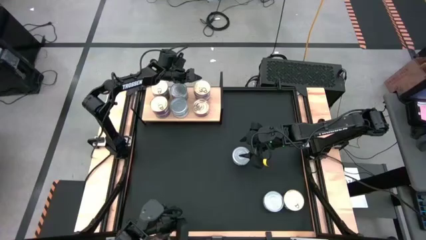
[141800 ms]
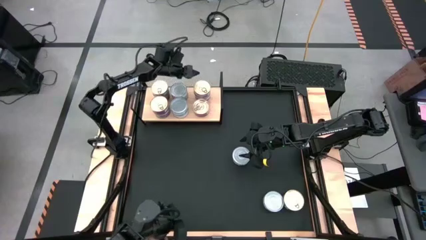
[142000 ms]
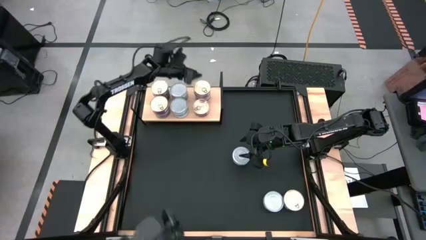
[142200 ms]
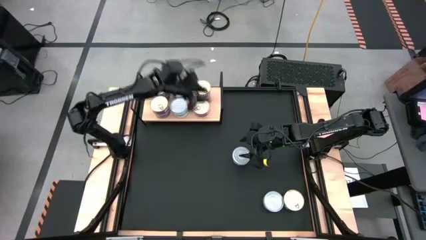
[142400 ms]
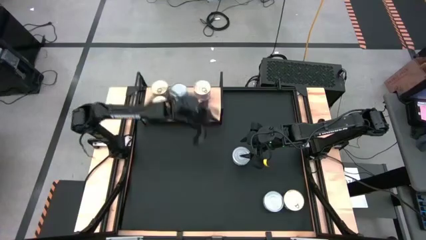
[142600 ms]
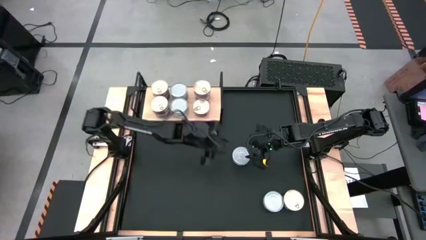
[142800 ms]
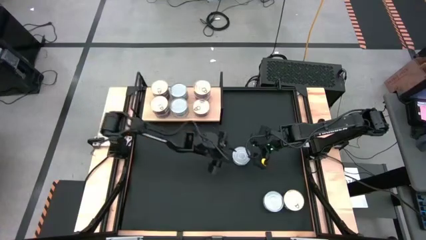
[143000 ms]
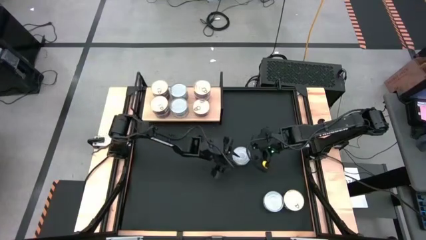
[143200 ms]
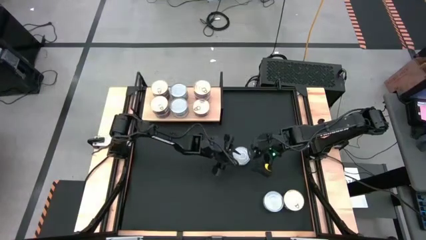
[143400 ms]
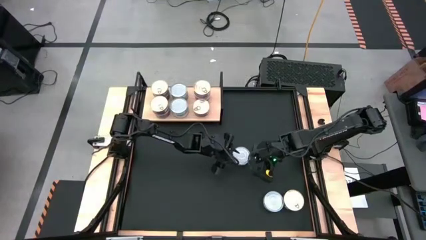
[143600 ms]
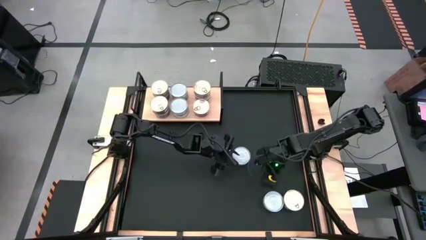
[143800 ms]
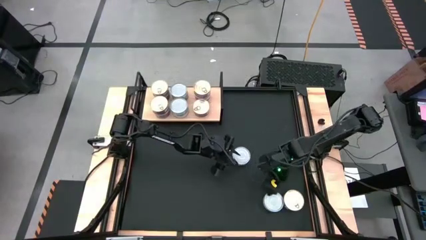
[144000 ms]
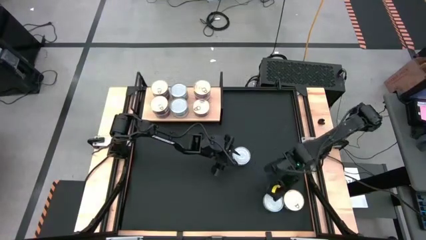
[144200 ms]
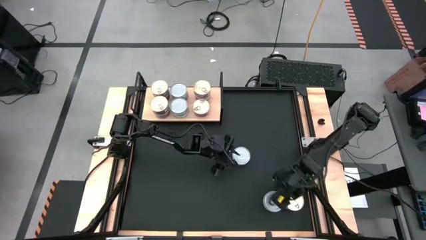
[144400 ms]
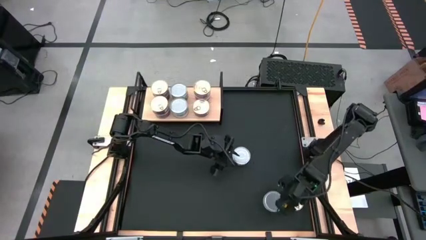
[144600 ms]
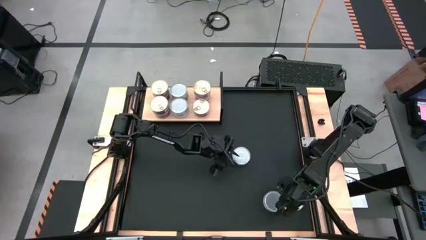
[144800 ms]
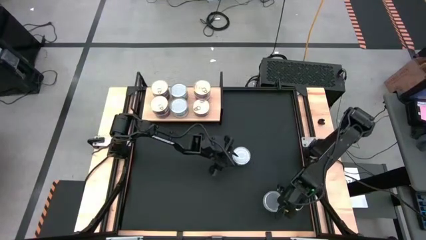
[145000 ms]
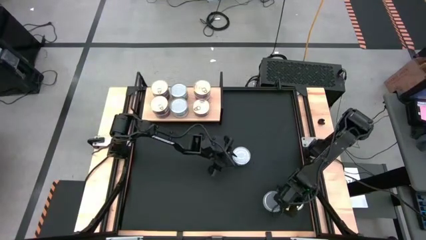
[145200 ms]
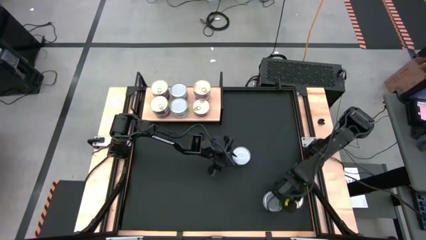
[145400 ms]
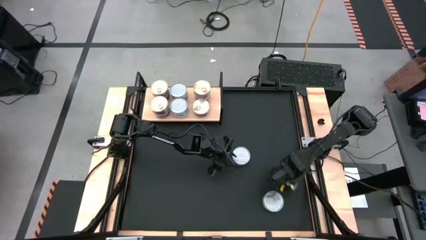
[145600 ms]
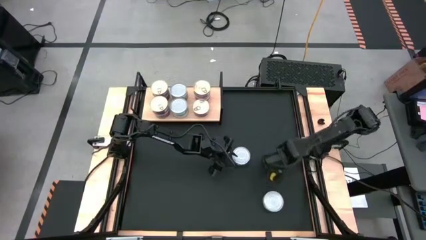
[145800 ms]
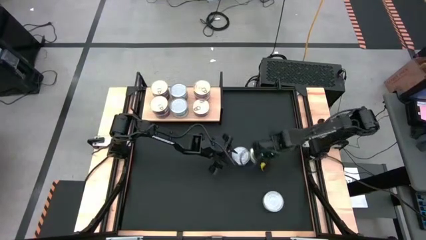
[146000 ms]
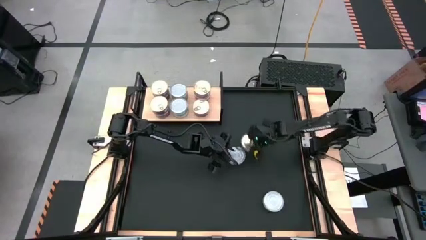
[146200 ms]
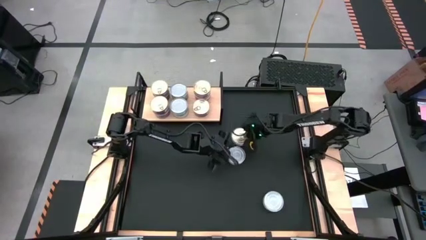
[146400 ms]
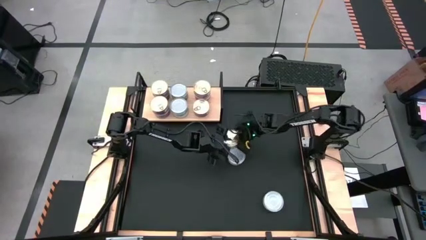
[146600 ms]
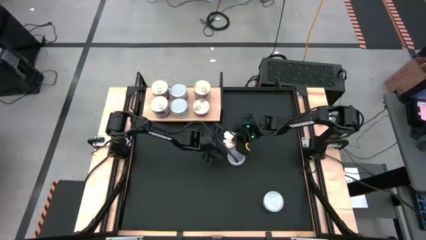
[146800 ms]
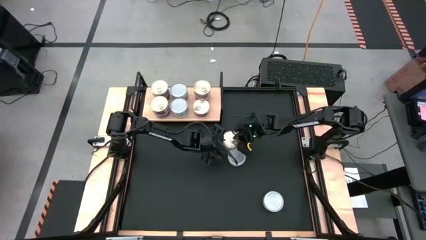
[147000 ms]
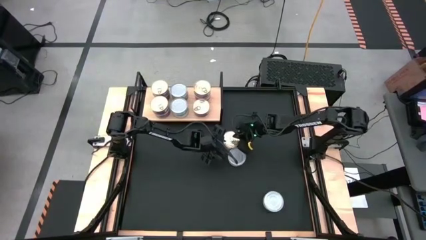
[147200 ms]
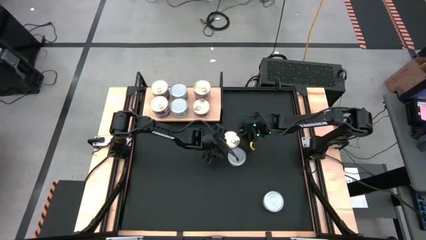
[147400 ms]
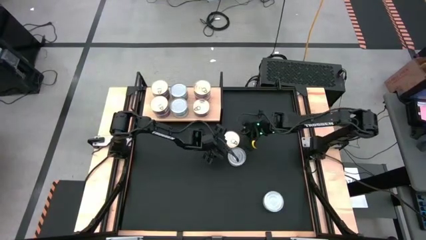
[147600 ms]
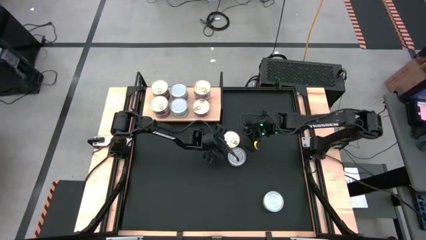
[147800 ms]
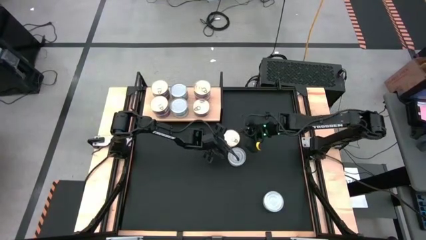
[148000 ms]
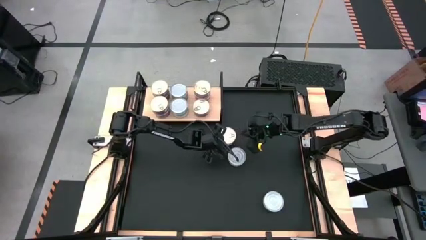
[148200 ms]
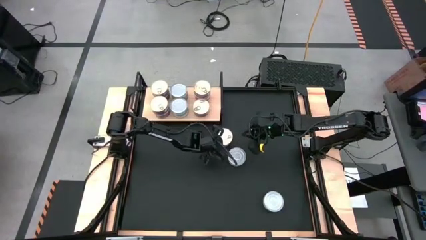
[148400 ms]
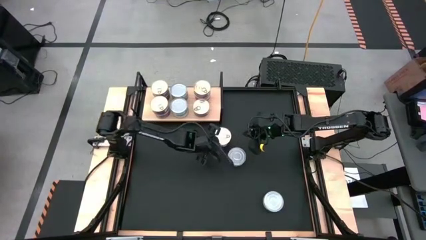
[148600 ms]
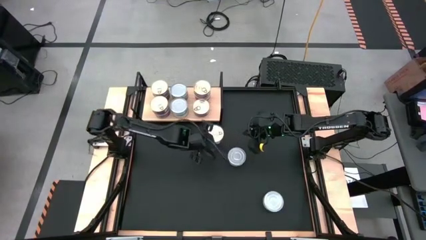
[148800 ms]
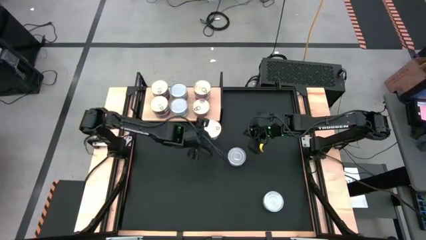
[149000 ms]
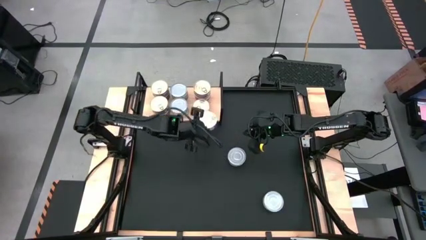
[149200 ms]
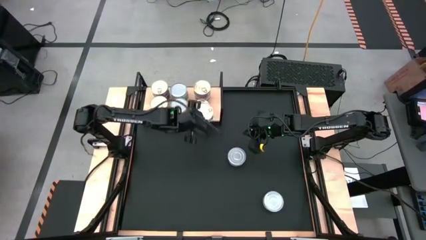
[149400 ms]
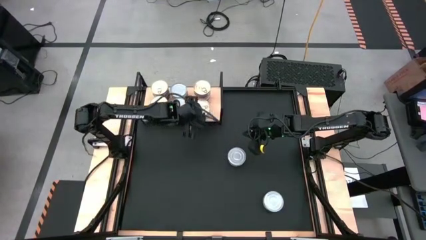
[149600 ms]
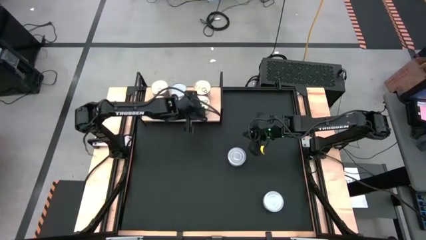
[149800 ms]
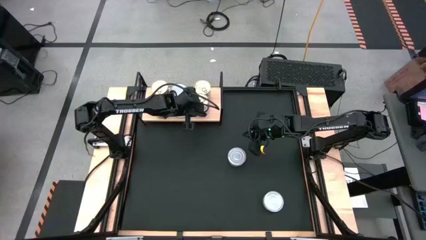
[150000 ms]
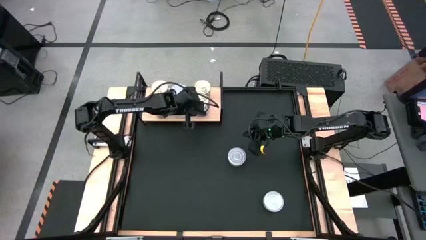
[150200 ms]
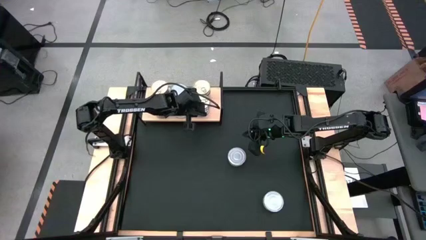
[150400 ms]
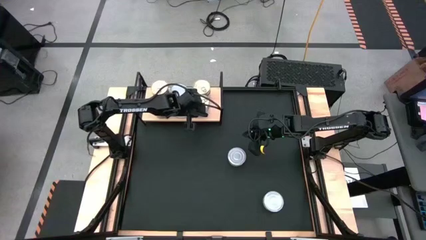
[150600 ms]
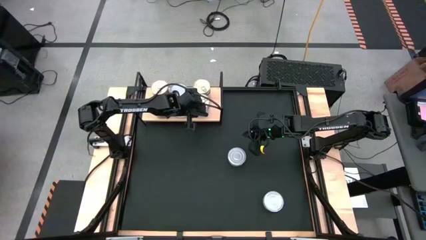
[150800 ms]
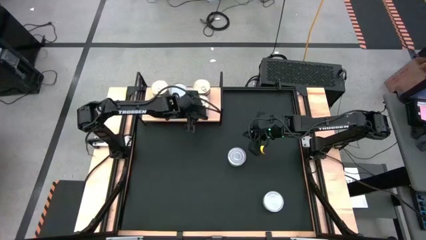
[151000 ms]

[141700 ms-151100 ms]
Task: Stack canned seafood by type on shelf
Stack the blue tuna can on top of the blue tuna on the shelf

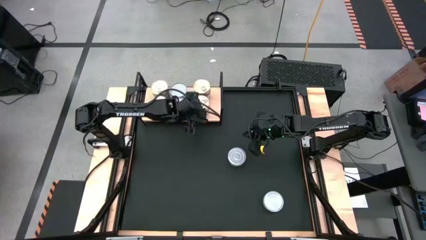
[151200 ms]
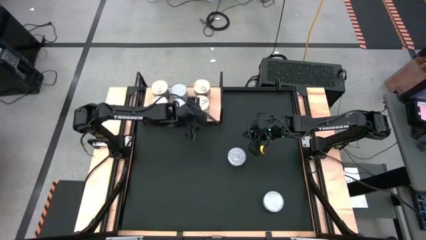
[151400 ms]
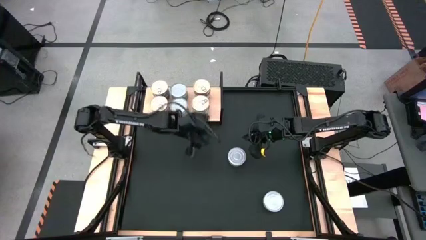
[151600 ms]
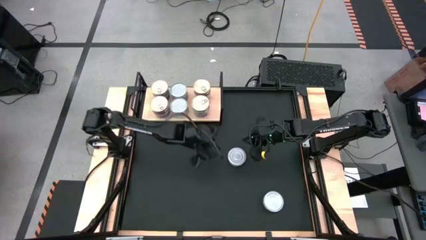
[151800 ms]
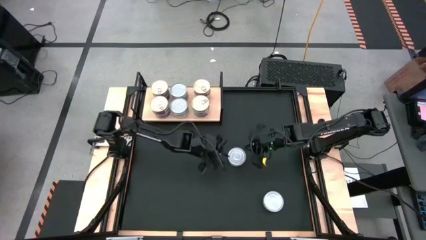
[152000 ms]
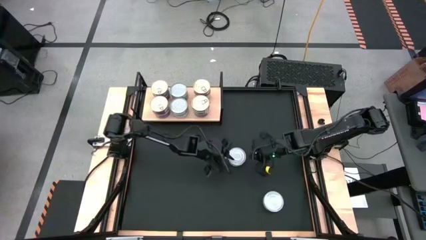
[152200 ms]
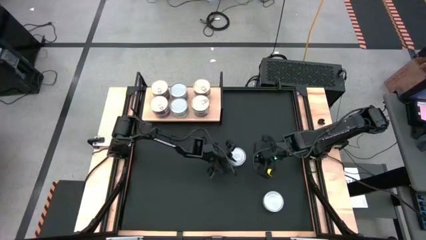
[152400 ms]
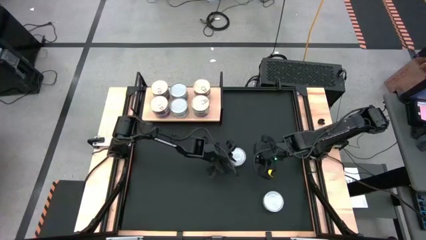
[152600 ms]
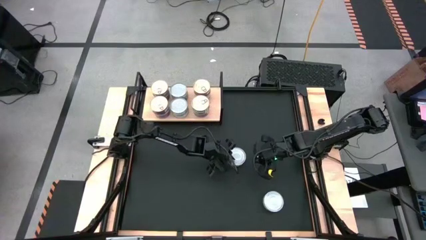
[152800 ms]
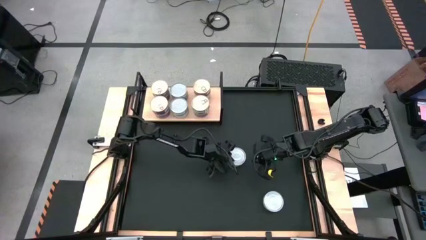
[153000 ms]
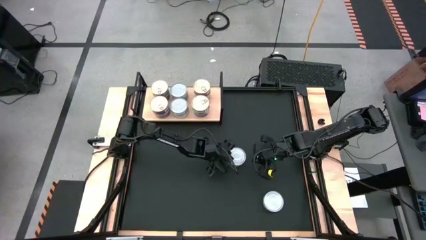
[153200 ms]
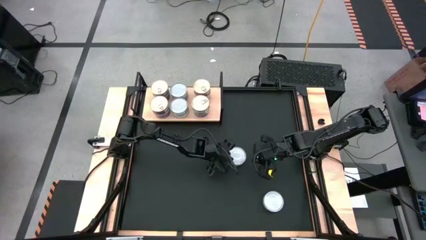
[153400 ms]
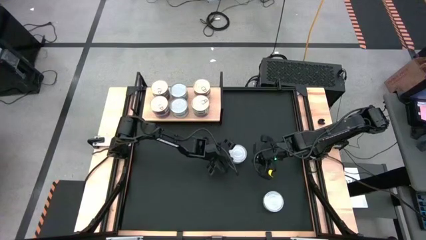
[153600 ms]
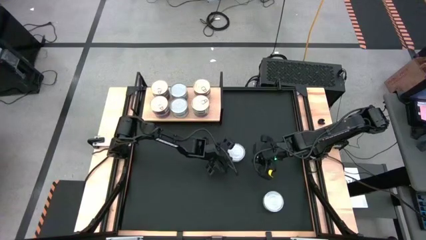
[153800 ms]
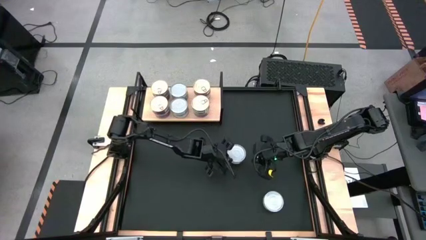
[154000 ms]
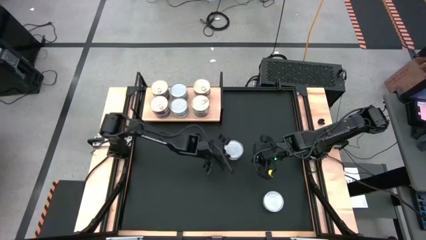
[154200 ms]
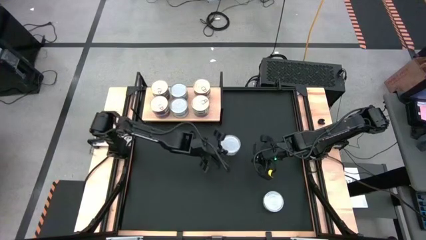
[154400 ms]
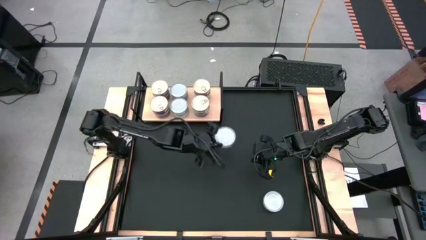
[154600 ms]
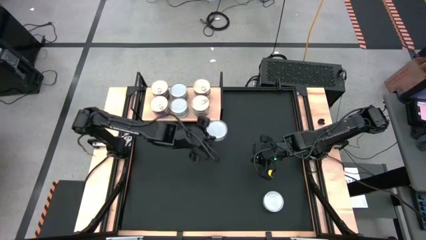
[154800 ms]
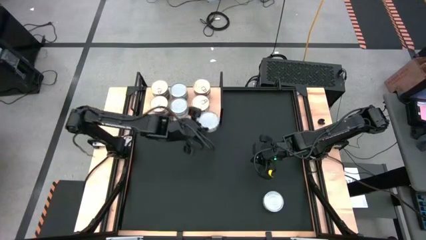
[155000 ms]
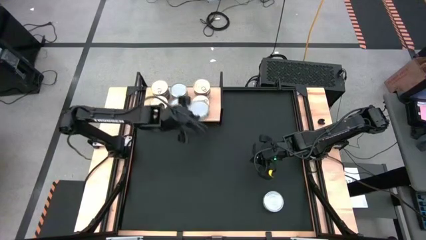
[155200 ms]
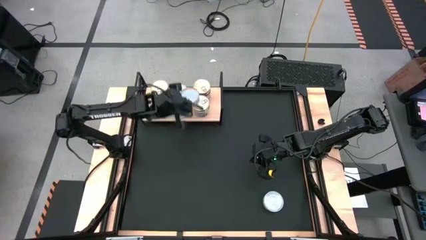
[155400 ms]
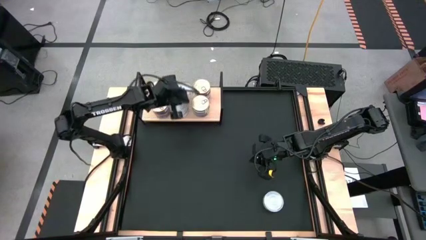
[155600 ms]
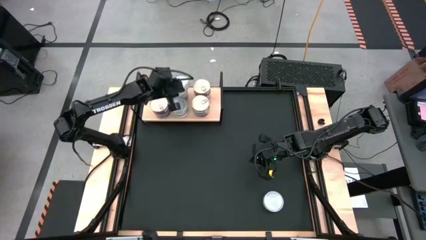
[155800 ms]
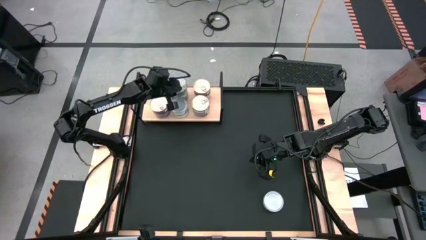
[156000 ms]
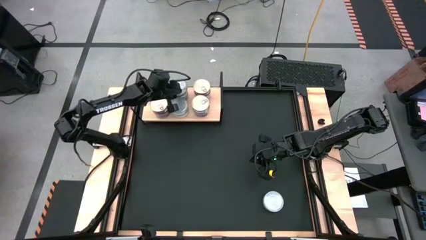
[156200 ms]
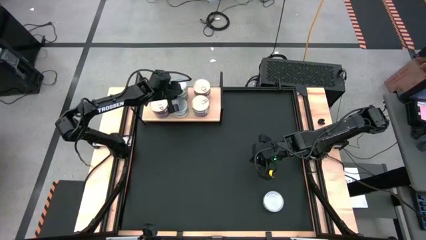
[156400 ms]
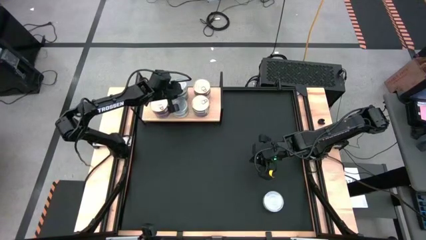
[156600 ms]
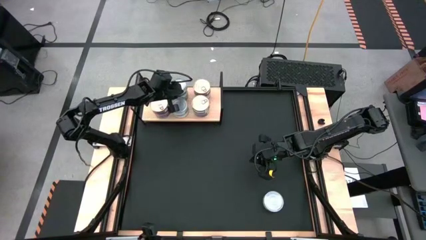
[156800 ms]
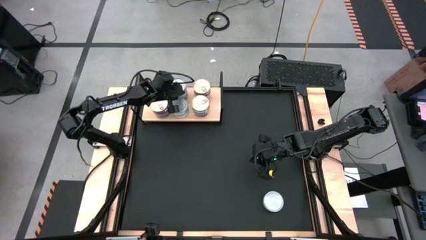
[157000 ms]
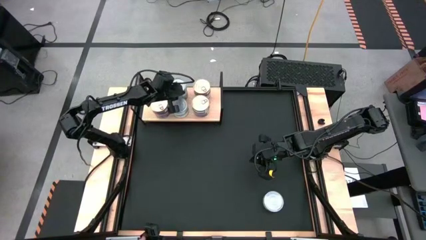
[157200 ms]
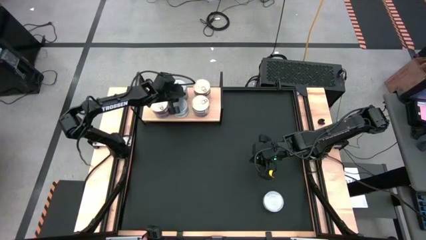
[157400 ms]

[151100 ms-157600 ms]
Stack the green tuna can on top of the green tuna on the shelf

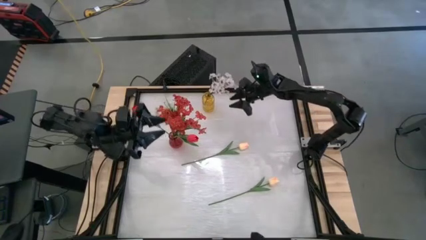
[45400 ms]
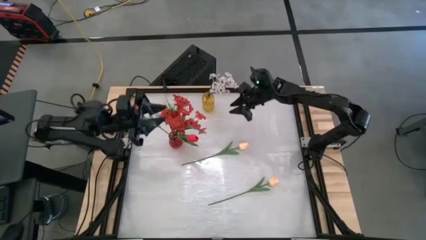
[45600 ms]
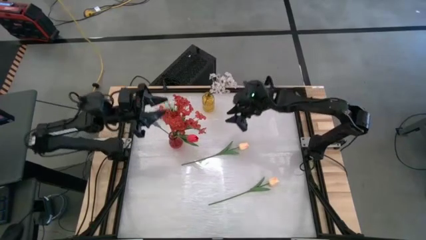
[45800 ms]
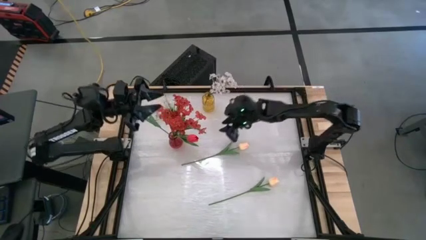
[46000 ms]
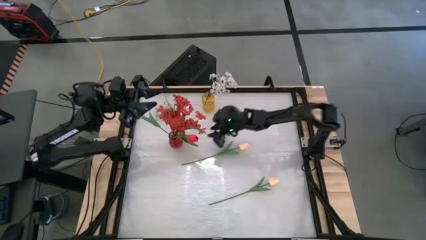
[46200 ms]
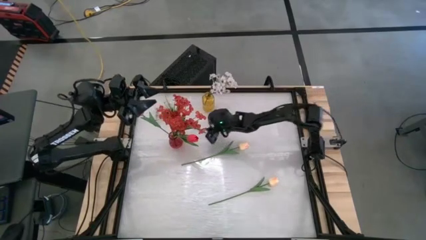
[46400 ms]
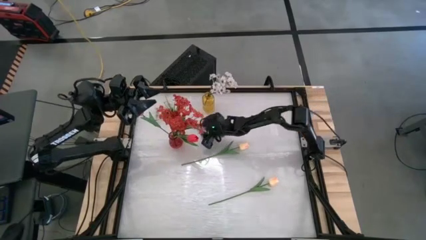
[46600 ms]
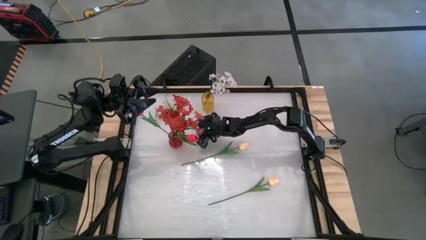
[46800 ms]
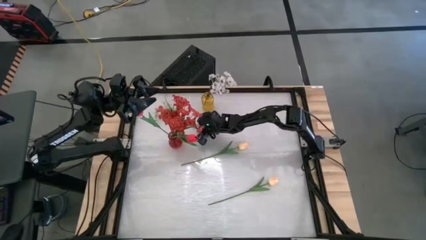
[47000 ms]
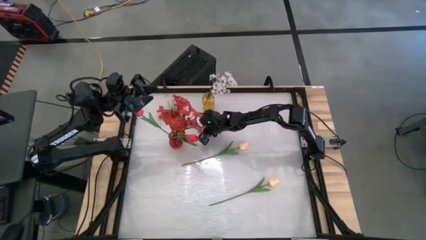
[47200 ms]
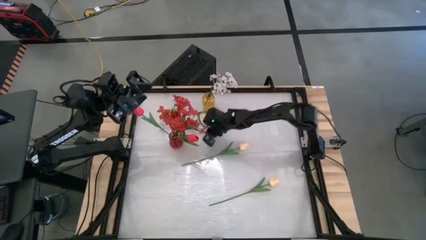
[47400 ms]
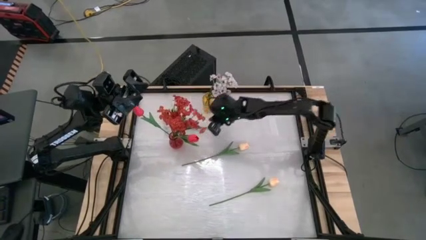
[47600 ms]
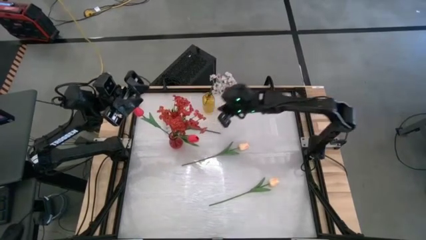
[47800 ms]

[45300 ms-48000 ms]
Task: Sort flowers into vase by color
Put the white flowers into the yellow flower vase
